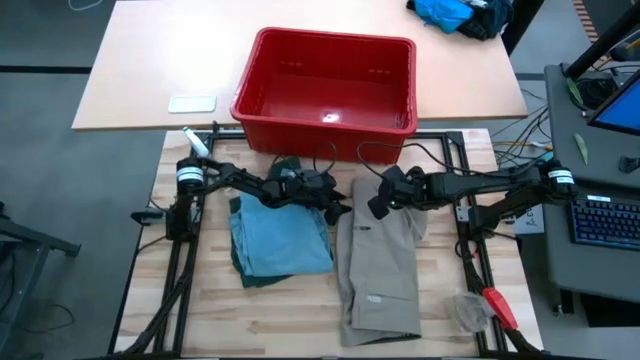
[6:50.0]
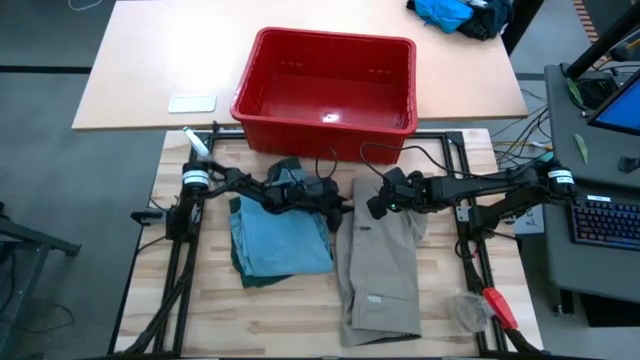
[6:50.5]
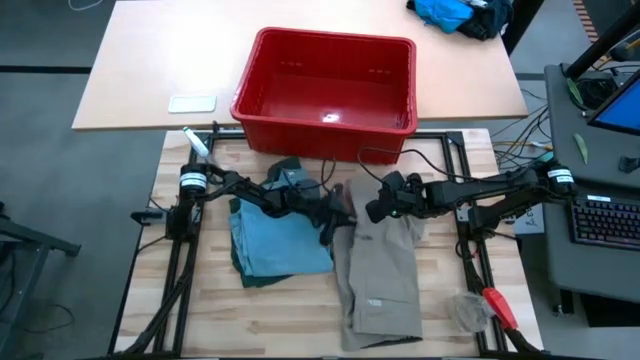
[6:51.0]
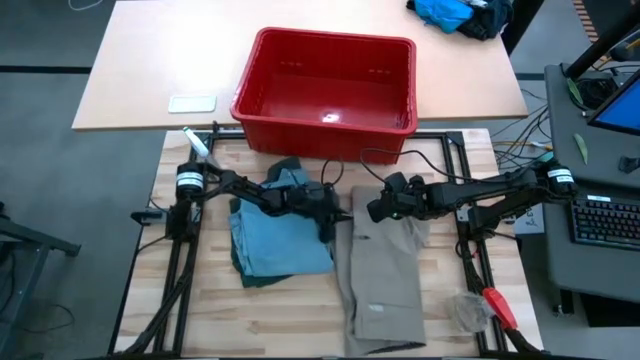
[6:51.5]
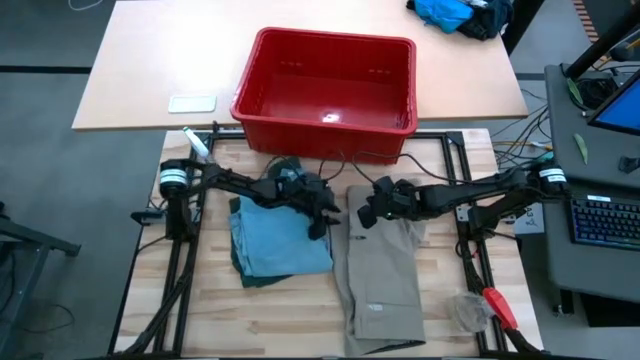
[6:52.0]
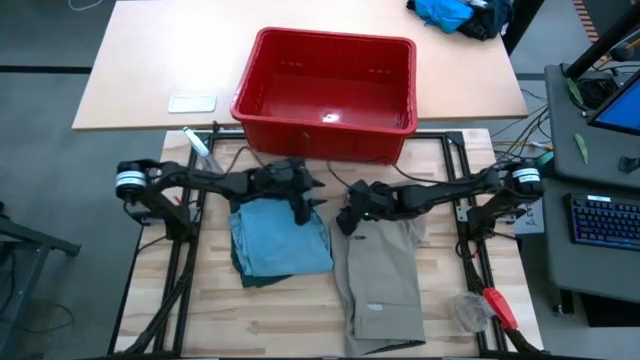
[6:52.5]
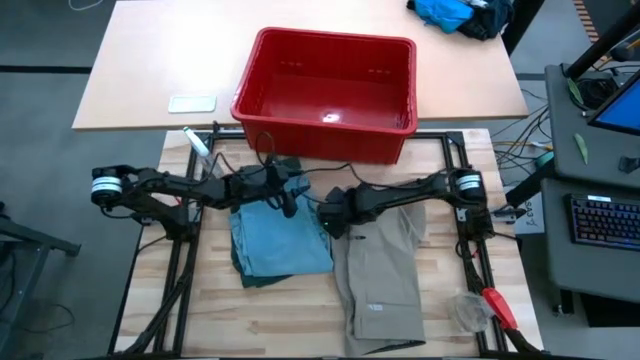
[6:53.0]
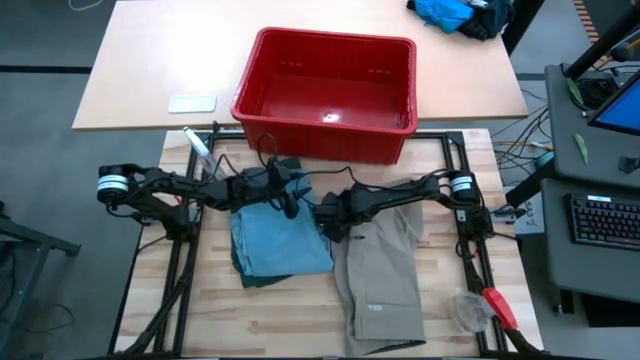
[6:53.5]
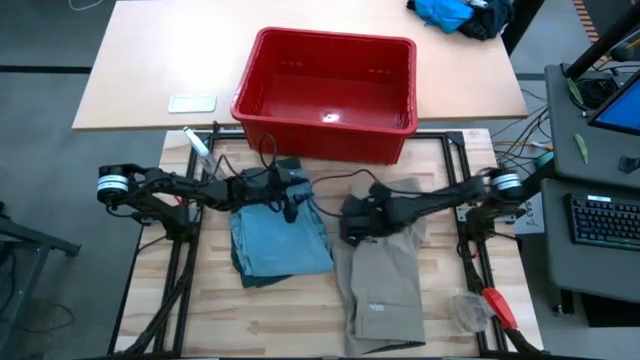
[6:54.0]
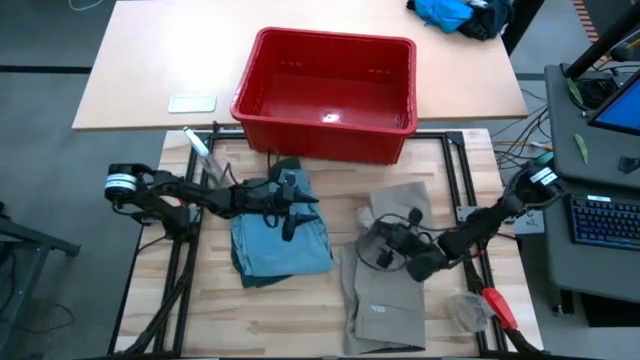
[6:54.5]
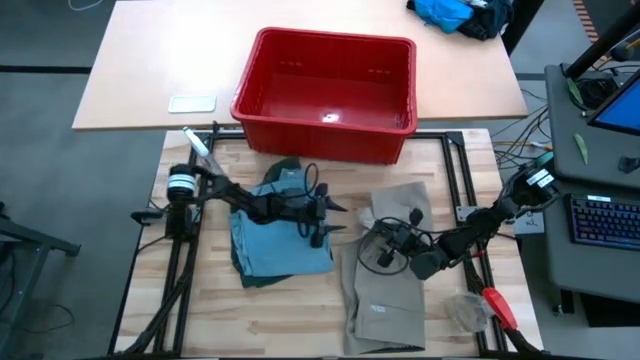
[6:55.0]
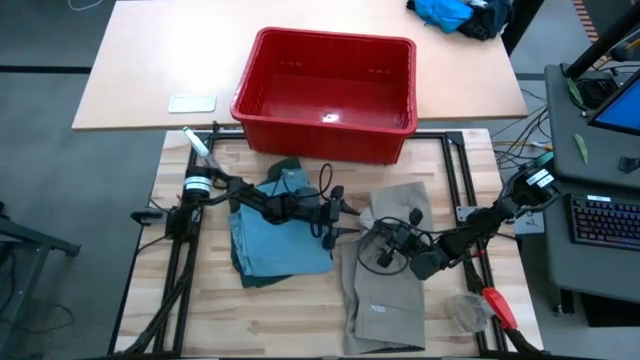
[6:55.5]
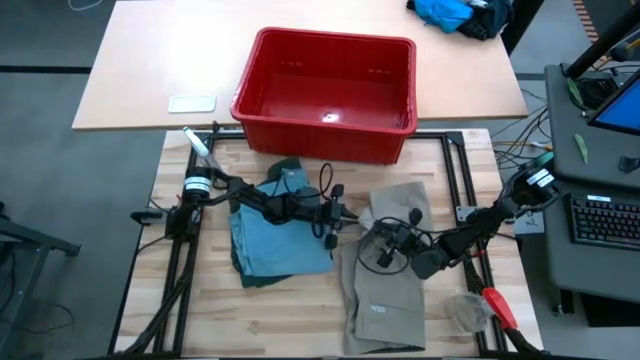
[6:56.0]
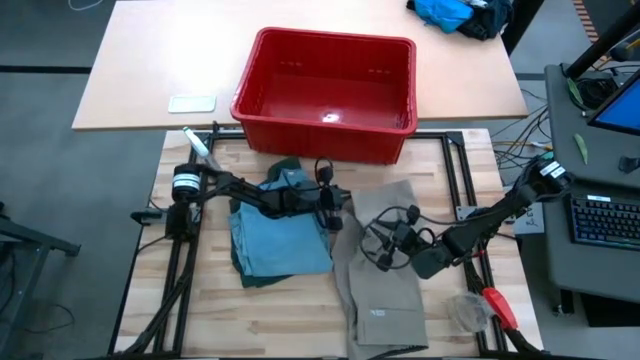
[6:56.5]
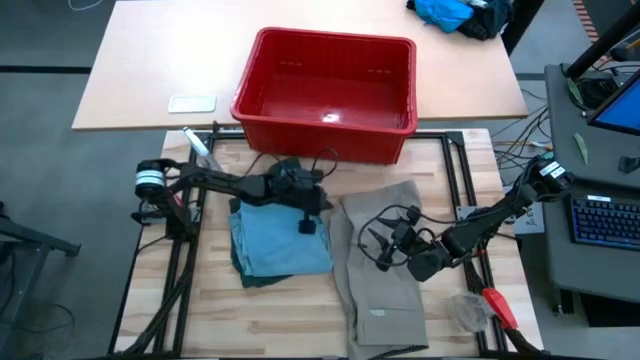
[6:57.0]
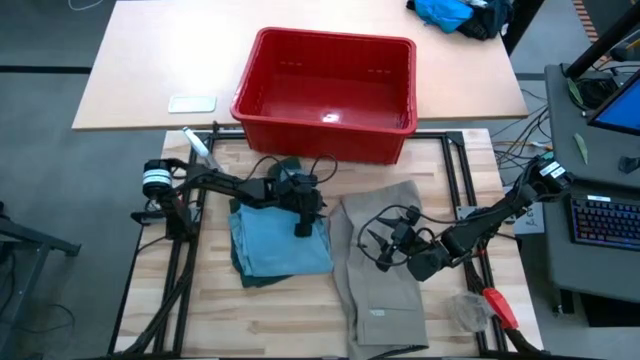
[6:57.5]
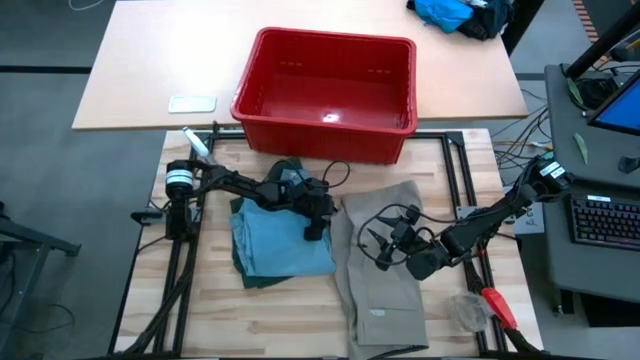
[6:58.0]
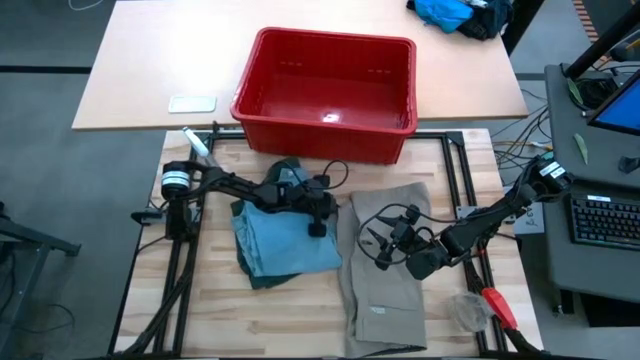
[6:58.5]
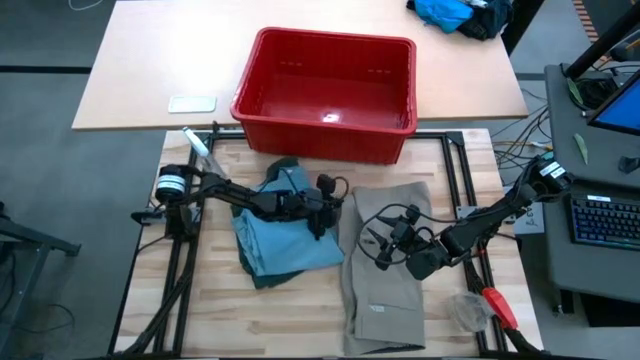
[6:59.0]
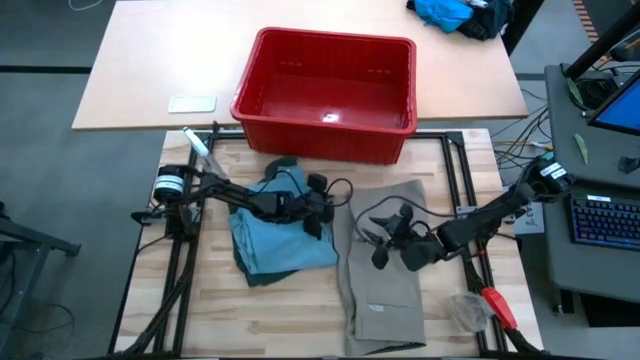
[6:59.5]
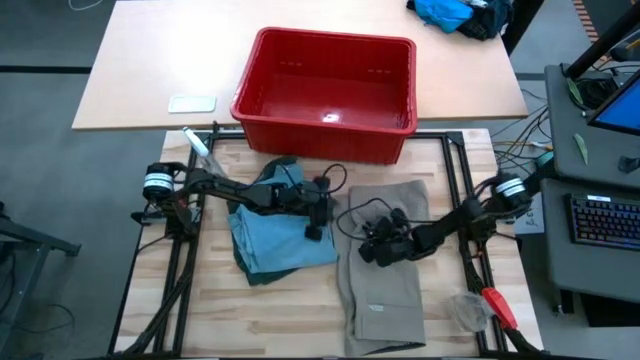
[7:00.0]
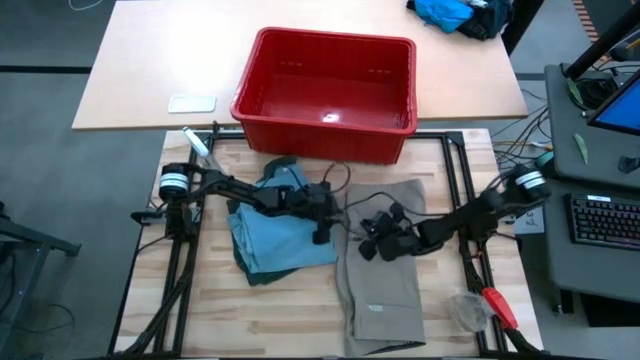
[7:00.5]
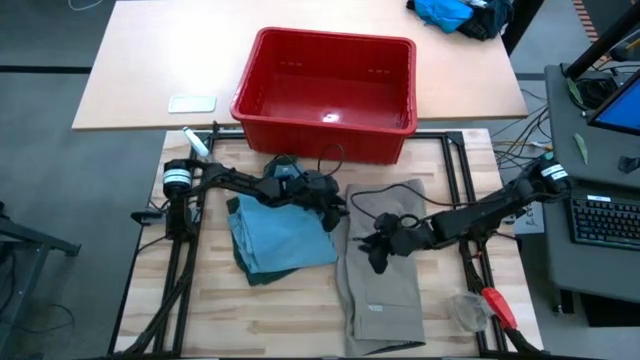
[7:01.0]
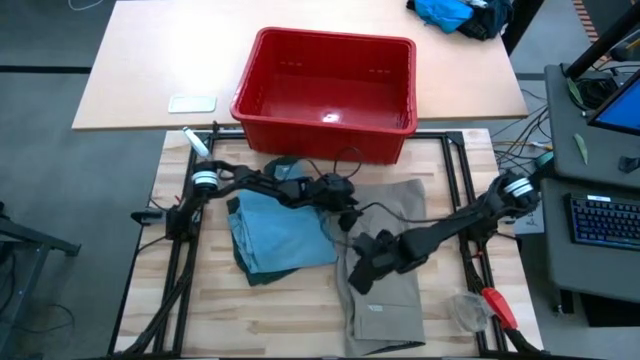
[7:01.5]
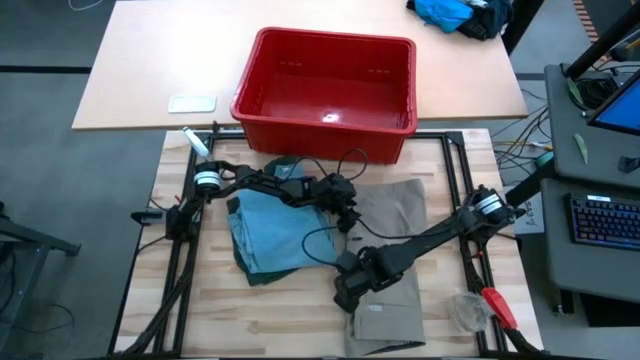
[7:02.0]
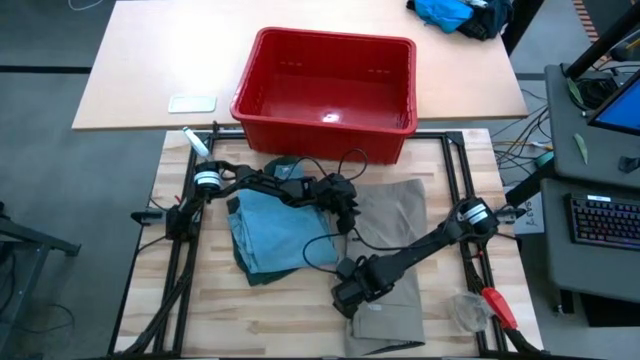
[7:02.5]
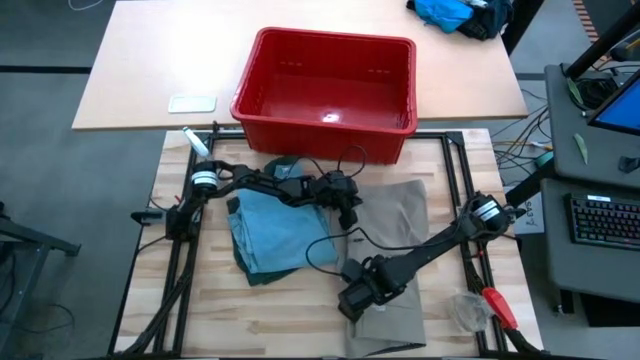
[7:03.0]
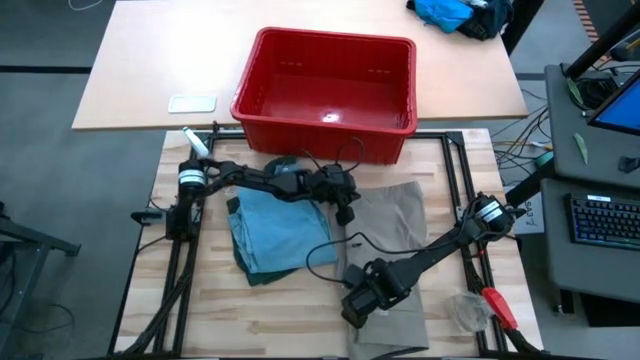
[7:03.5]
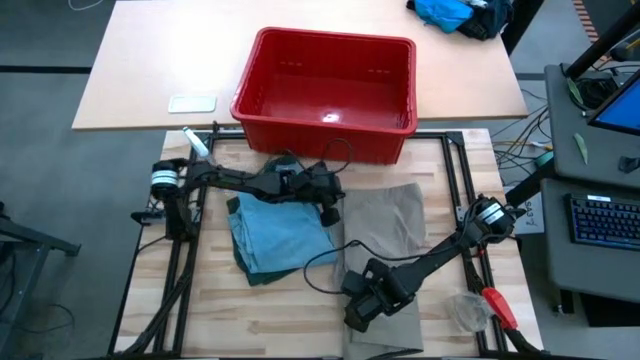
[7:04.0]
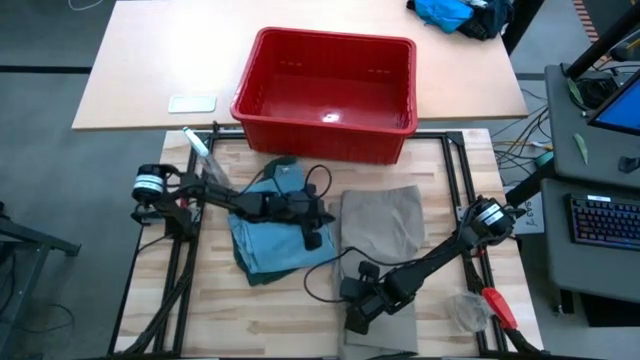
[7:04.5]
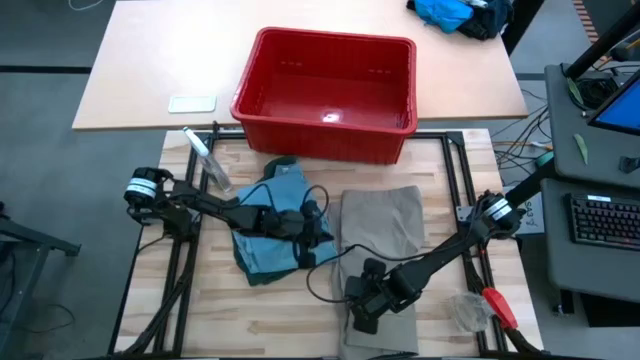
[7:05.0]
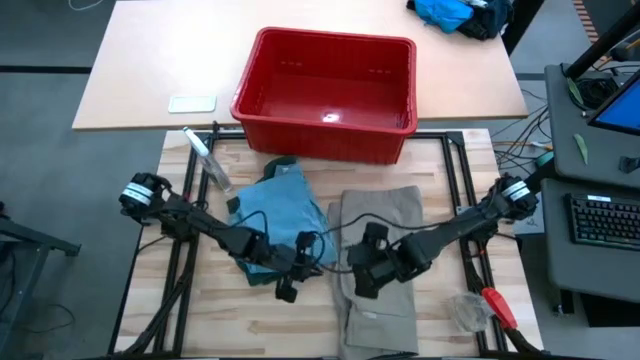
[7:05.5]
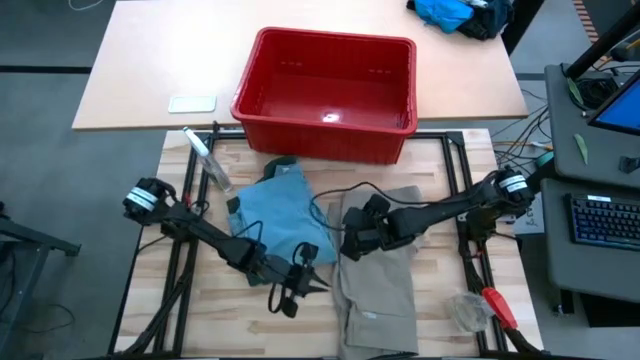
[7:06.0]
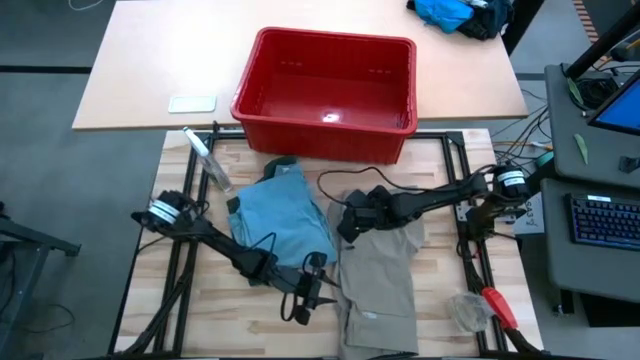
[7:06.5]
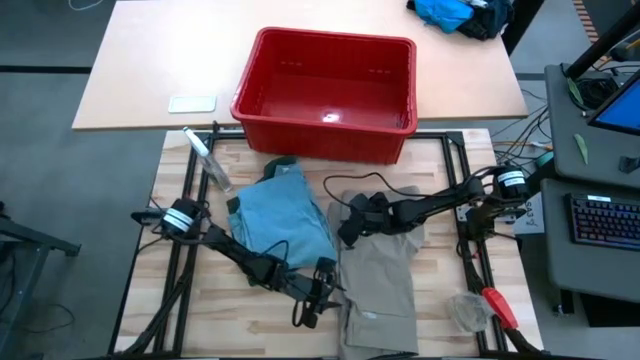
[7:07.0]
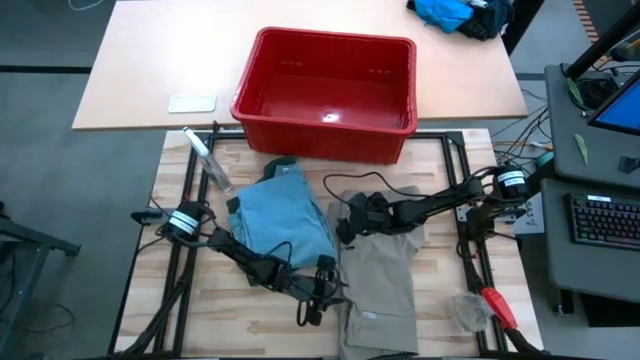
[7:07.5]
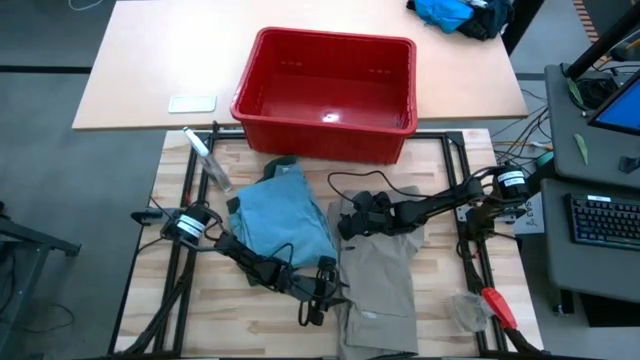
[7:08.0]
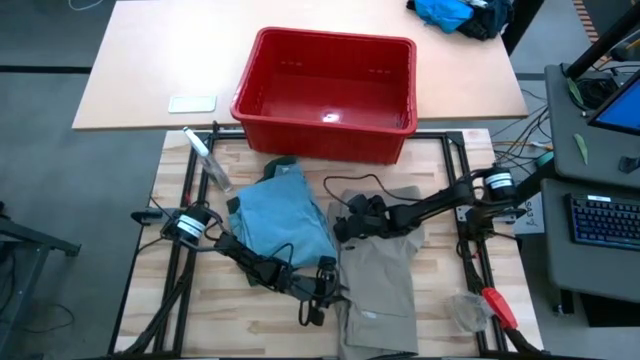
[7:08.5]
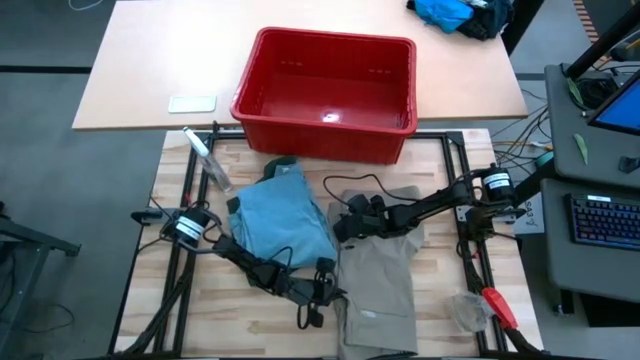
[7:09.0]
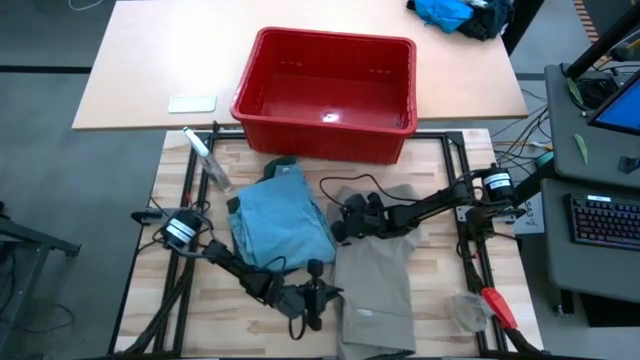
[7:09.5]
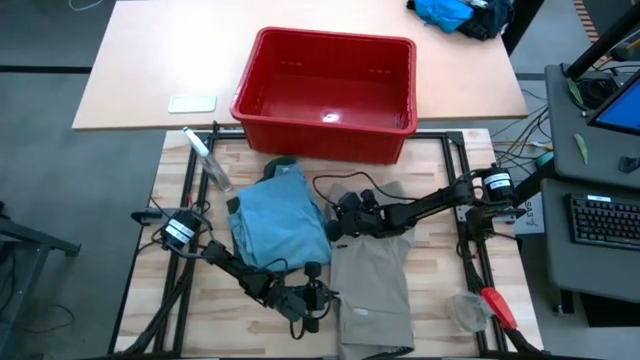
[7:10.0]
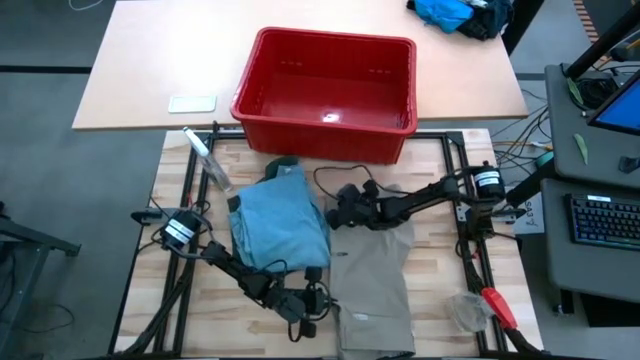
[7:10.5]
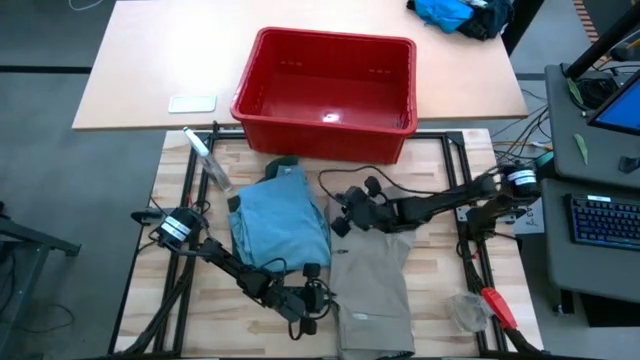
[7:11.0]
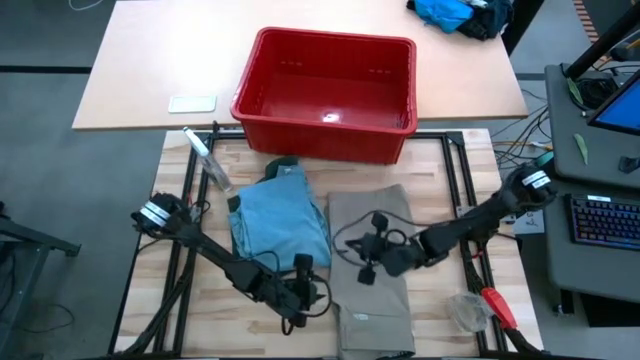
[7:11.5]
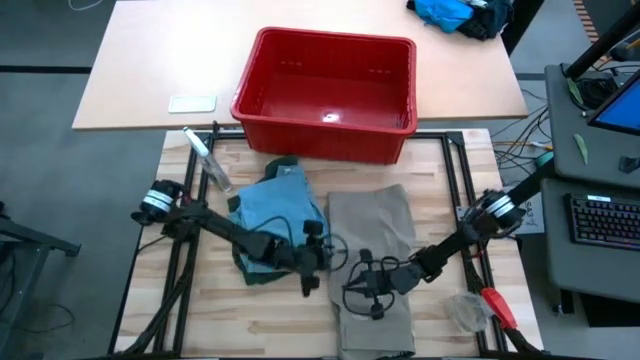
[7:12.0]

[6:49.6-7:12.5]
Task: Fold Laundry from Bin
Fold the light brown shorts
